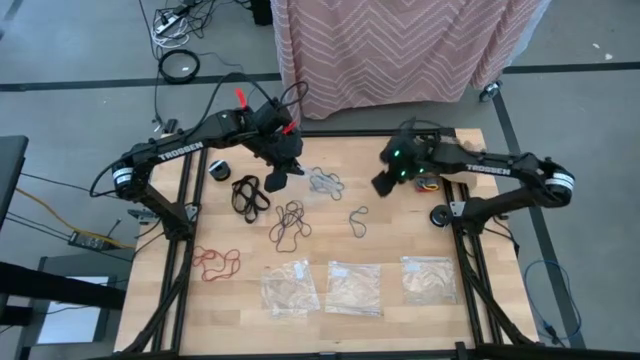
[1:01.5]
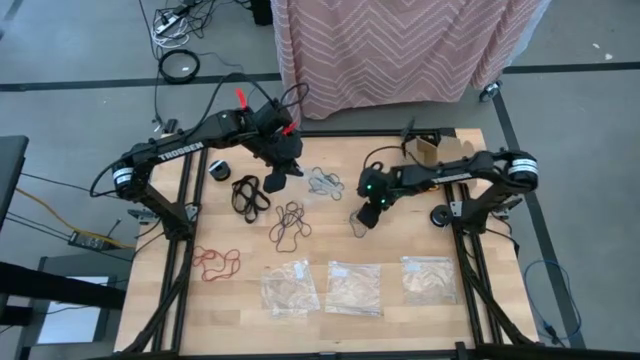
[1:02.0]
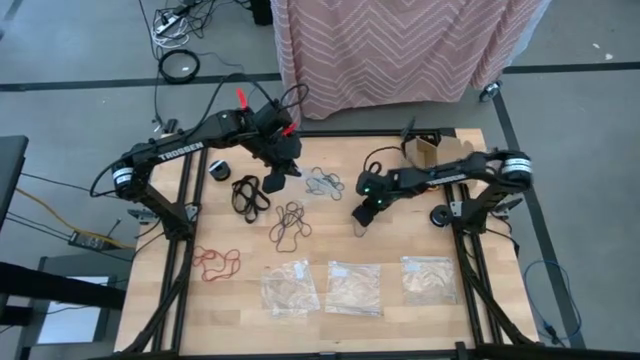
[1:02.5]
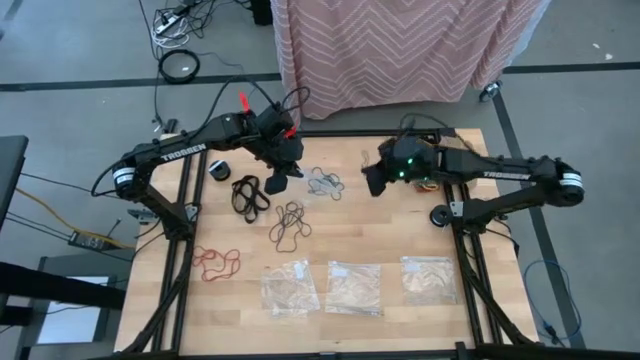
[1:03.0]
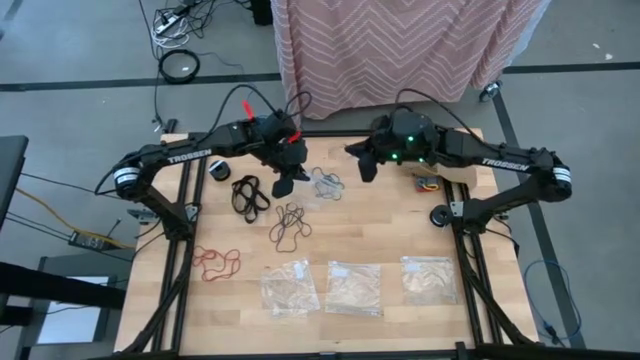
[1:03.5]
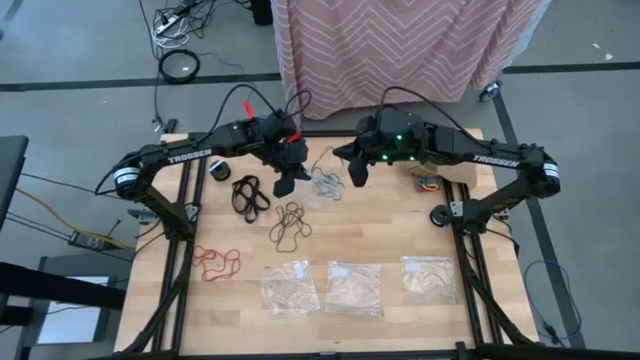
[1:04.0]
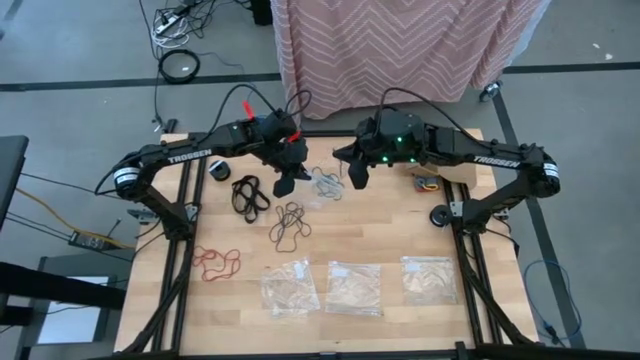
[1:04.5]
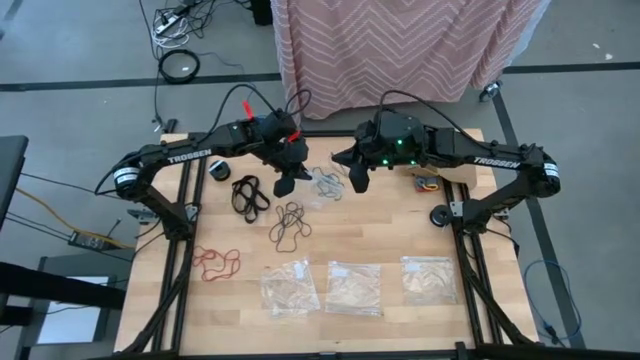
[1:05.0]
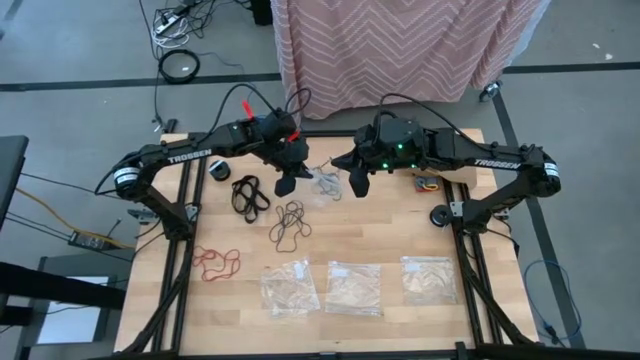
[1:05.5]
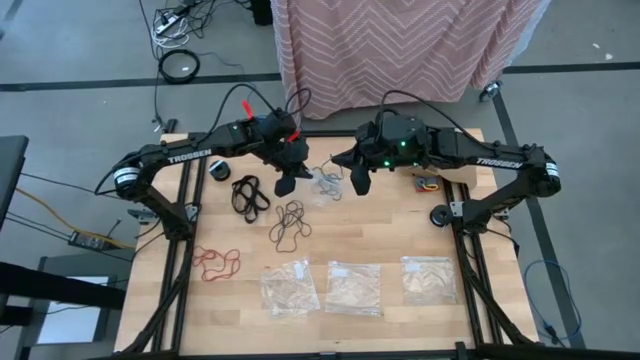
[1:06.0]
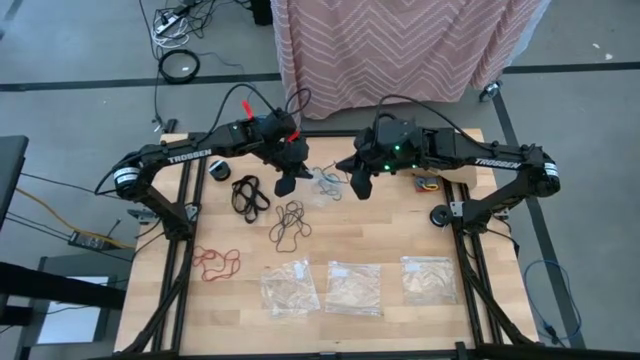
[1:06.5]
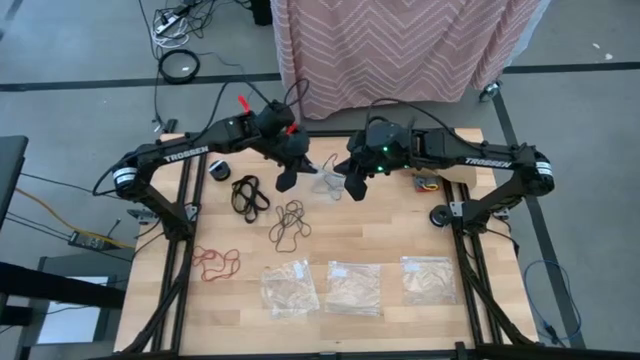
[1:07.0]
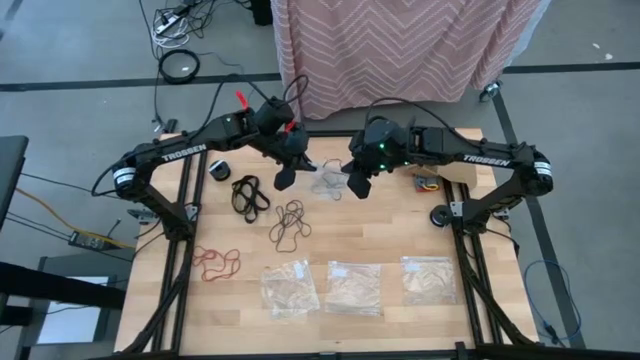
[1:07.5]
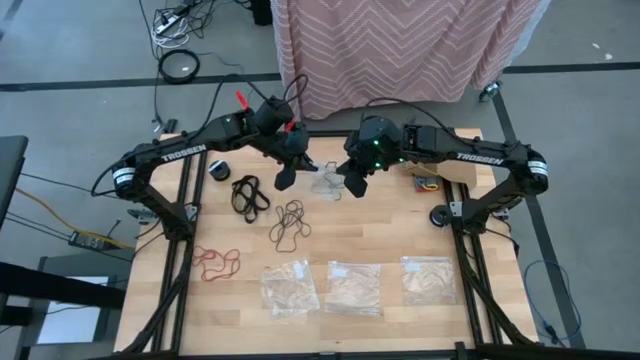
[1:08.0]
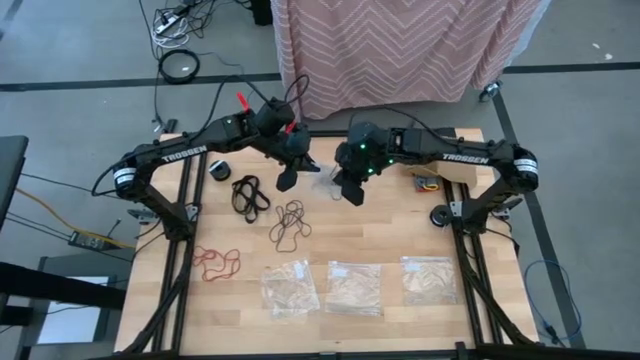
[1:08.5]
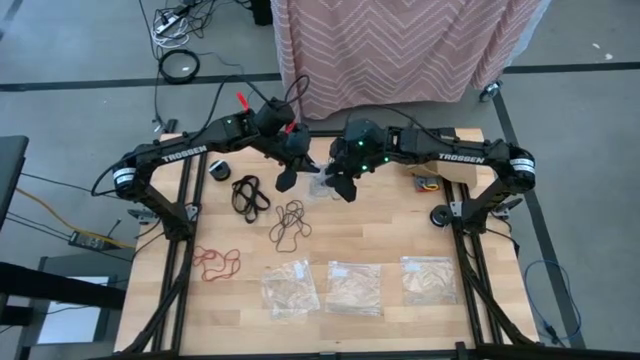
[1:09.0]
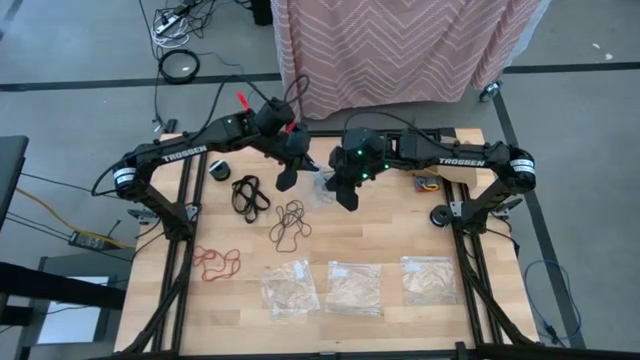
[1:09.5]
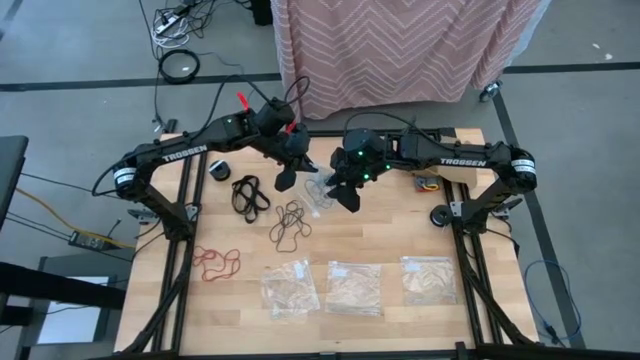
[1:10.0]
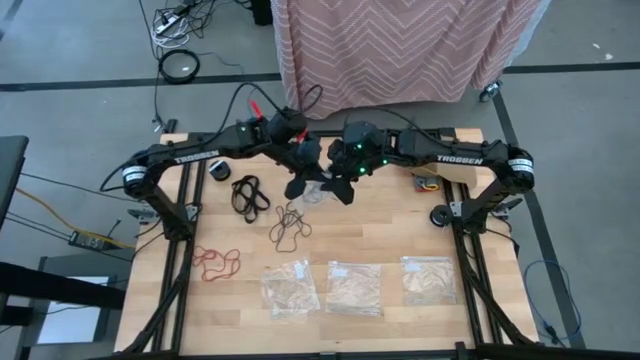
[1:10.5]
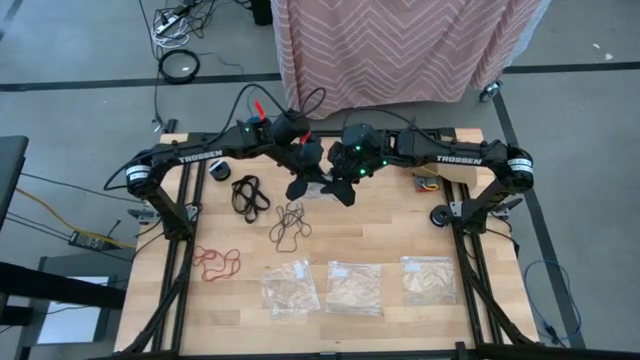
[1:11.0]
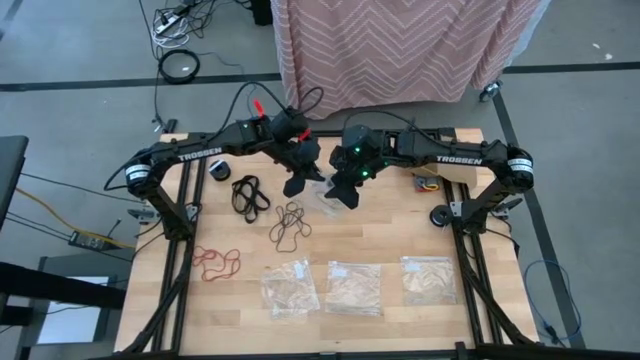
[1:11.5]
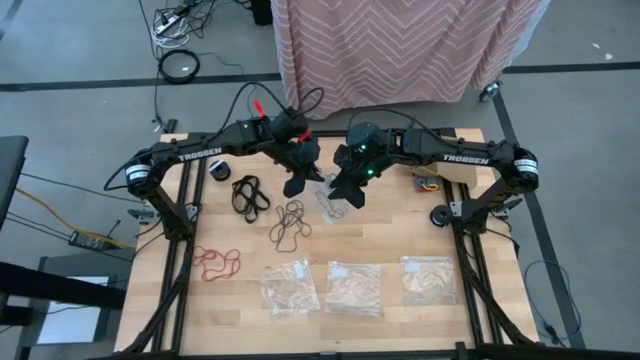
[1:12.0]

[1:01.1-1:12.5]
Task: Sort rubber bands
Put the blue rubber band into the top transparent zip bag

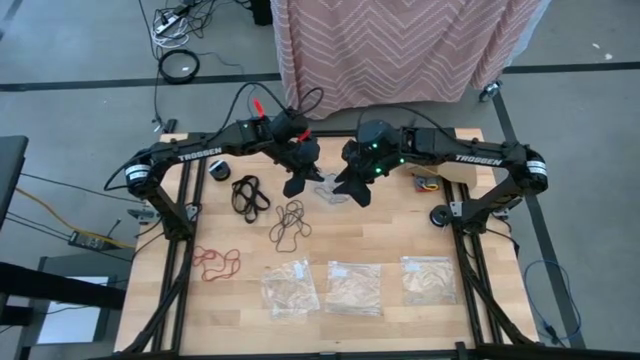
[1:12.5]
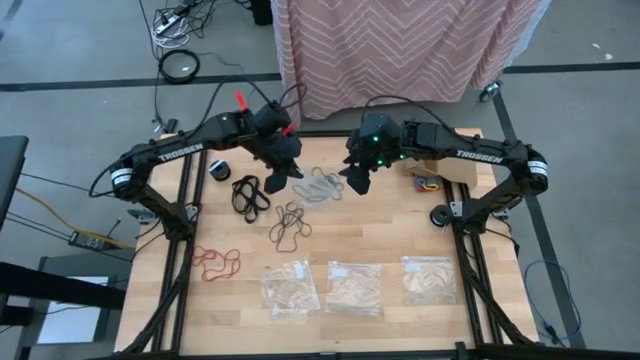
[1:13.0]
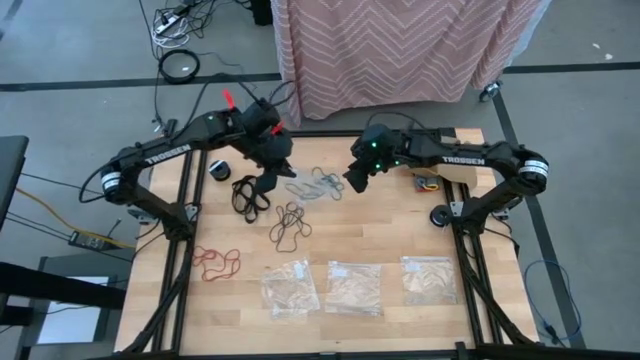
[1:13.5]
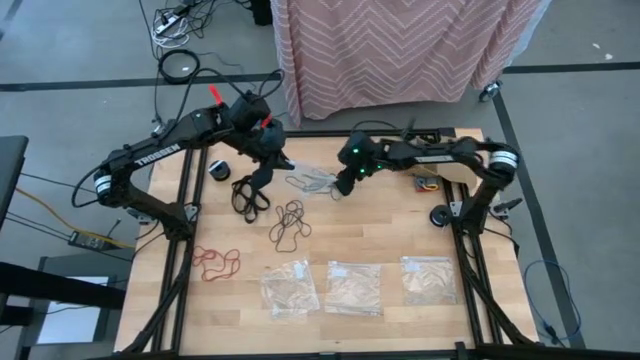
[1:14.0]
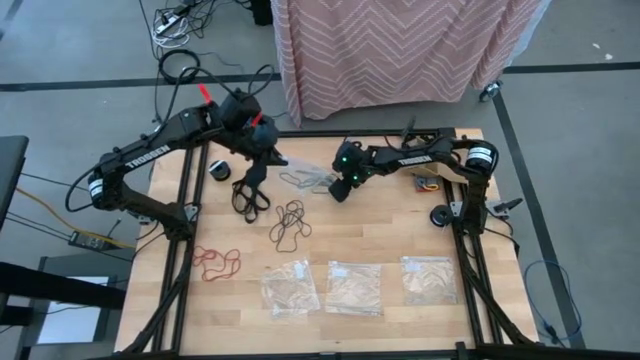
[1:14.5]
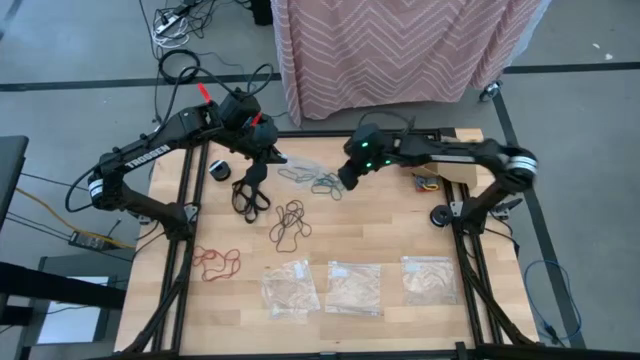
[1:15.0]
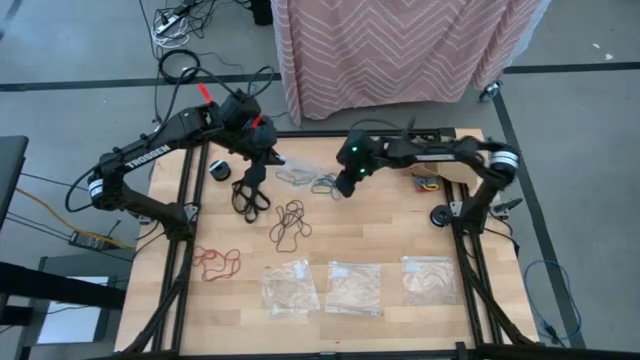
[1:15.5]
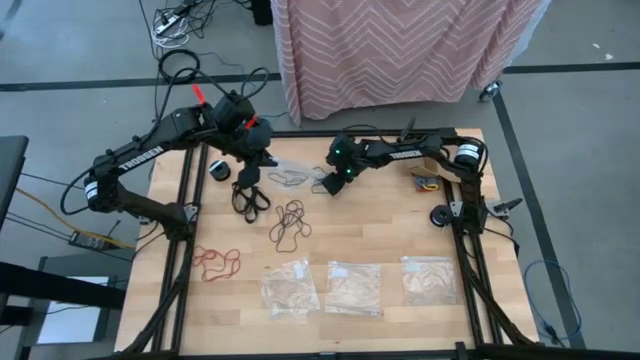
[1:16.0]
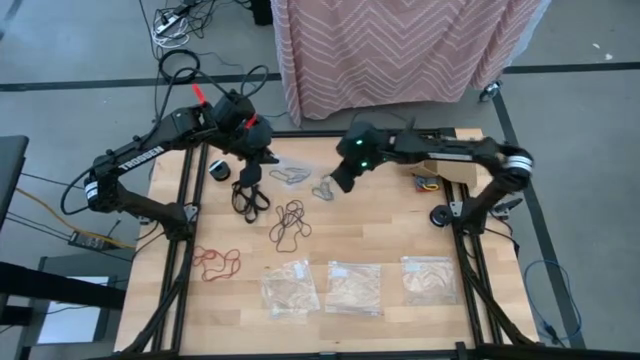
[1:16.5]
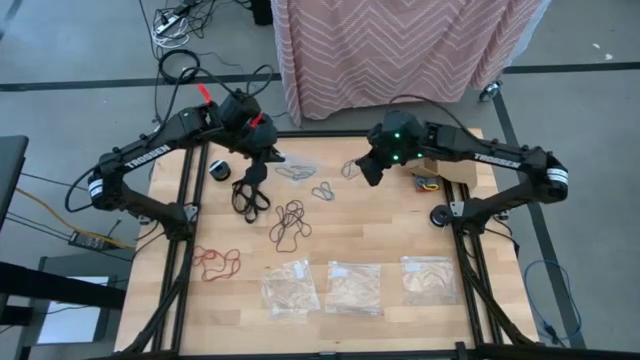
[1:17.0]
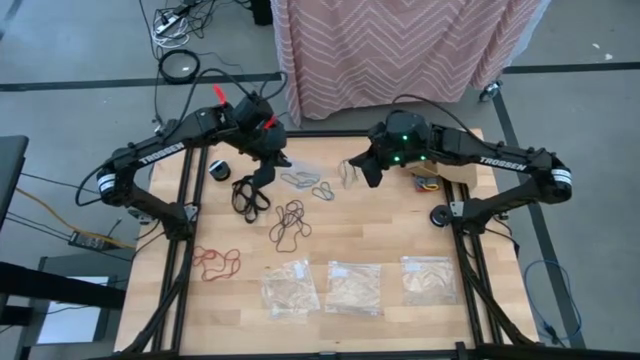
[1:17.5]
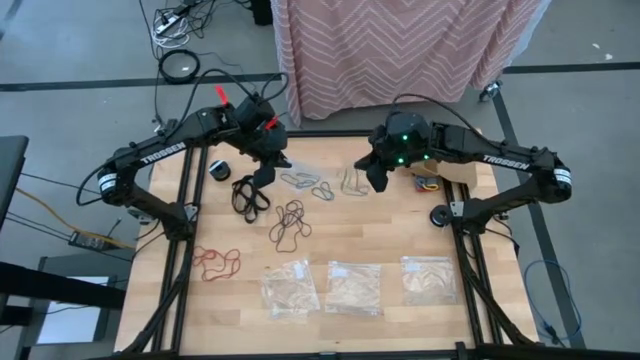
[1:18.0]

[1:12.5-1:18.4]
Put the blue rubber band into the top transparent zip bag

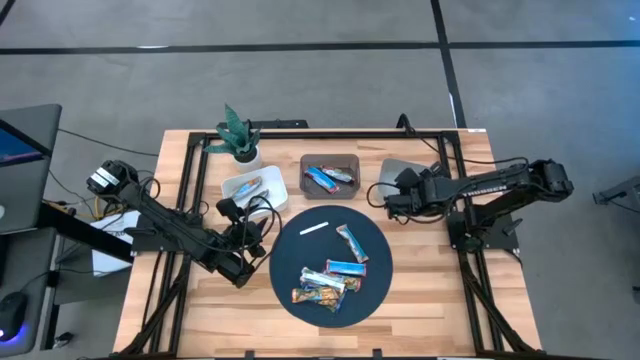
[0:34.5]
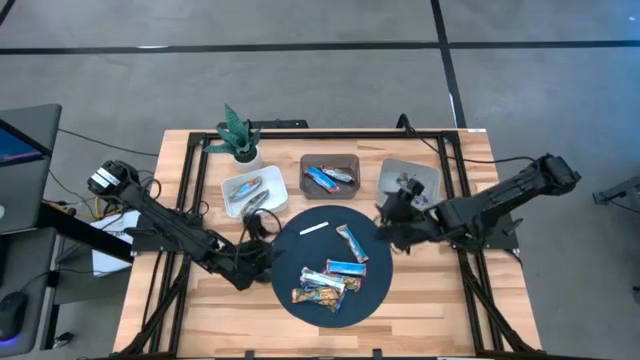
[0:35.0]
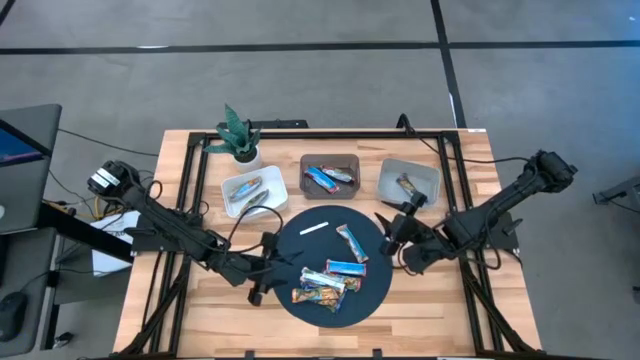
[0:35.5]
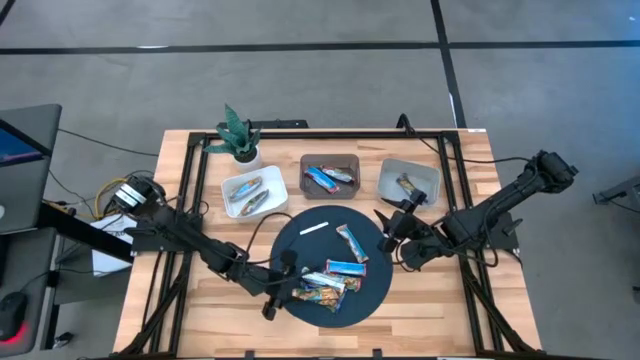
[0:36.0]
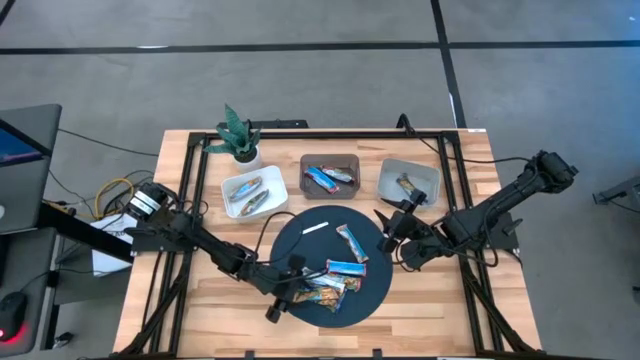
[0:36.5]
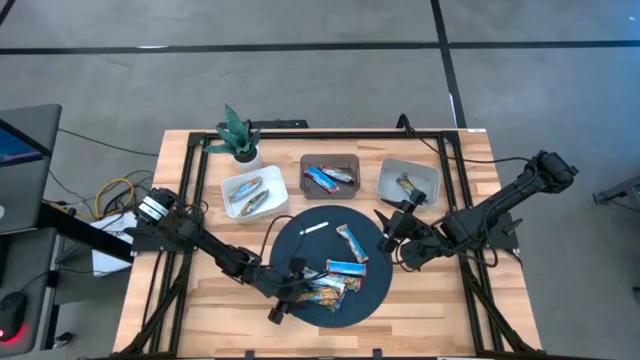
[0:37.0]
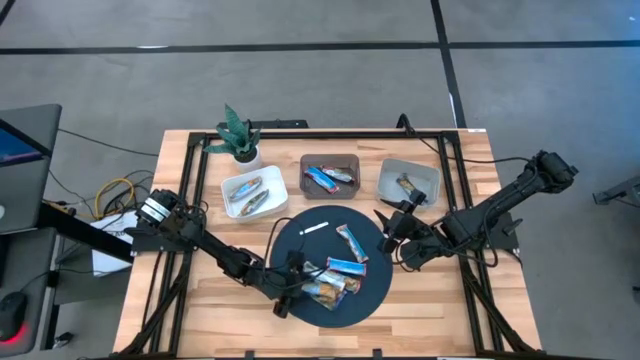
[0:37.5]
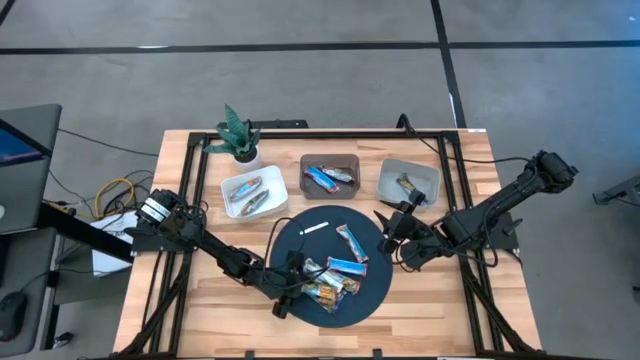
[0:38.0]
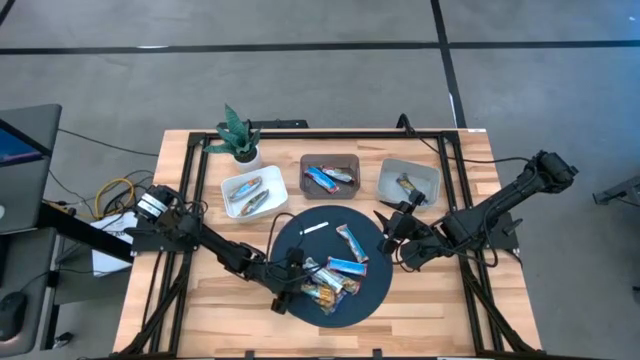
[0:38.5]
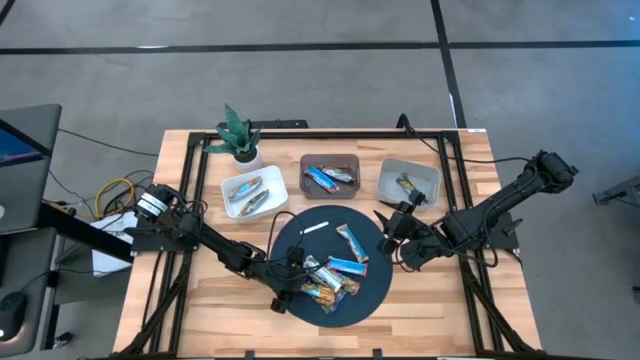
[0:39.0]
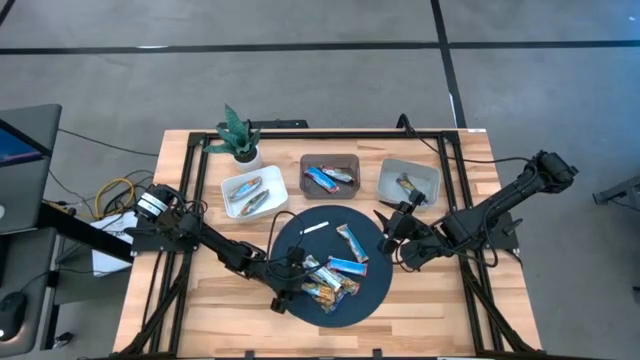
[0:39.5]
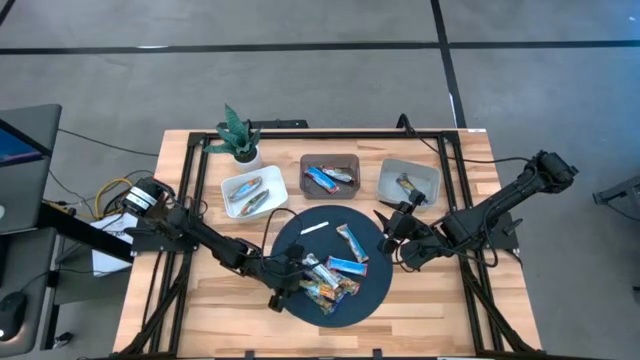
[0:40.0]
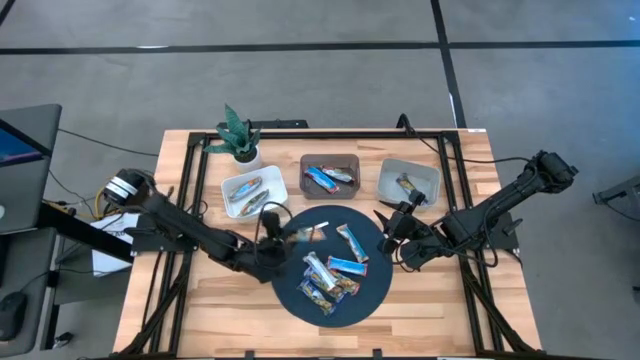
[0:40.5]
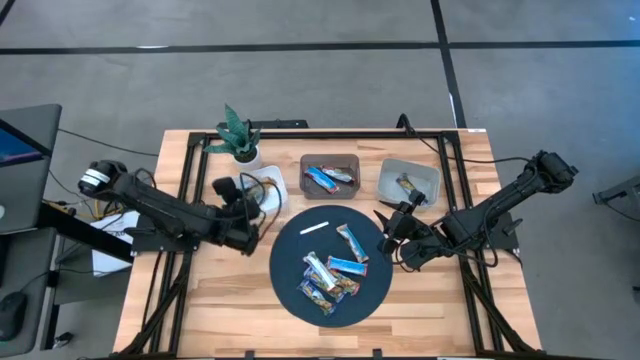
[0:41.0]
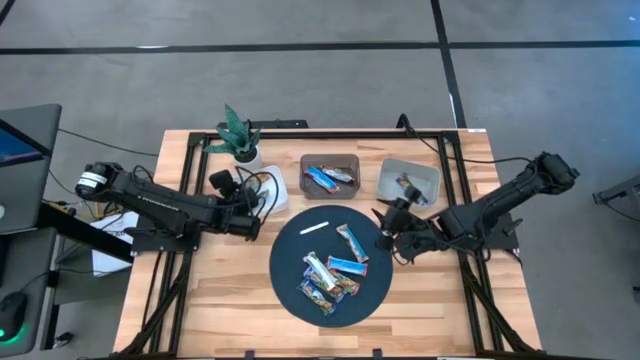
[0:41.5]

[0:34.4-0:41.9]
Task: Pick and place Granola Bars by type
Put the bottom orange granola bar into the white bin
